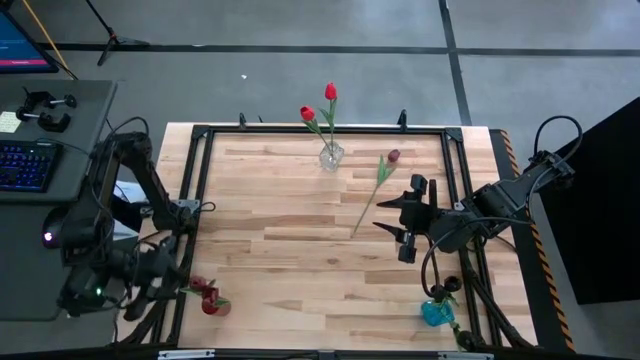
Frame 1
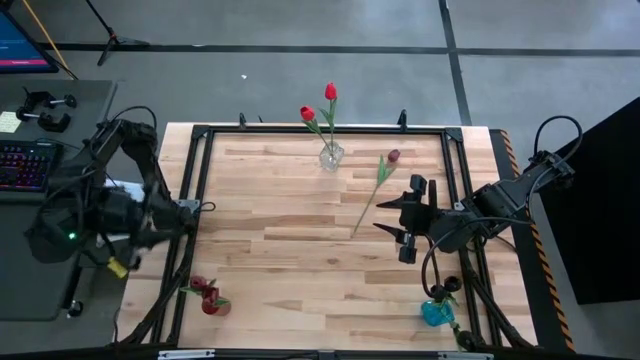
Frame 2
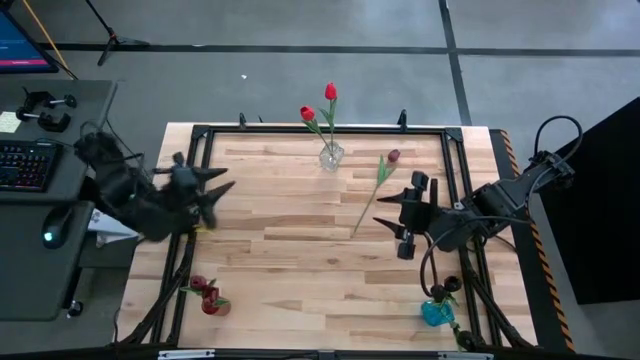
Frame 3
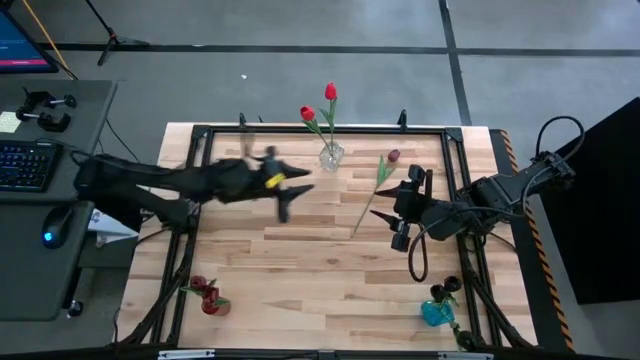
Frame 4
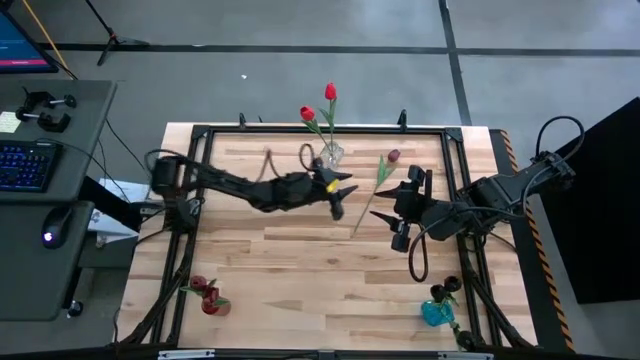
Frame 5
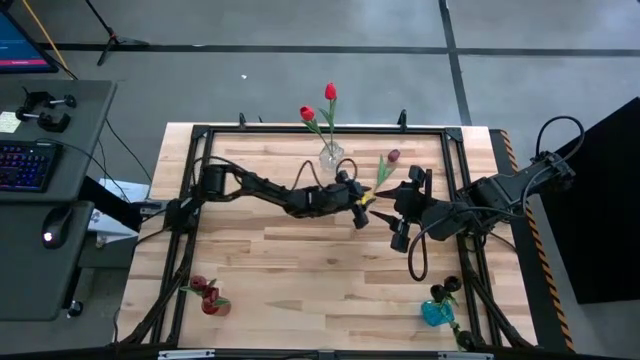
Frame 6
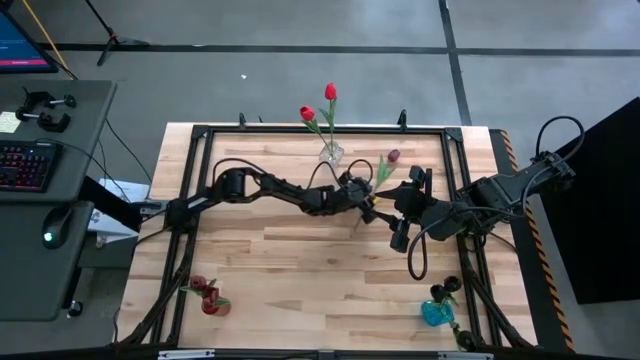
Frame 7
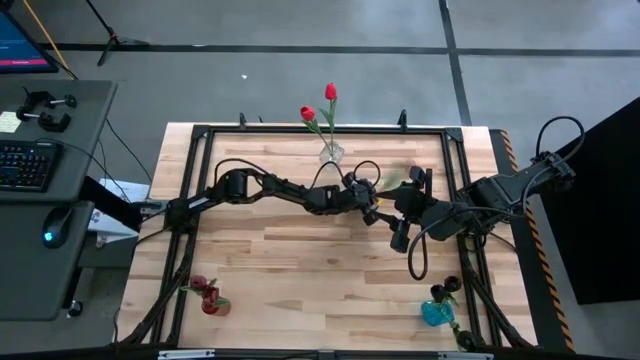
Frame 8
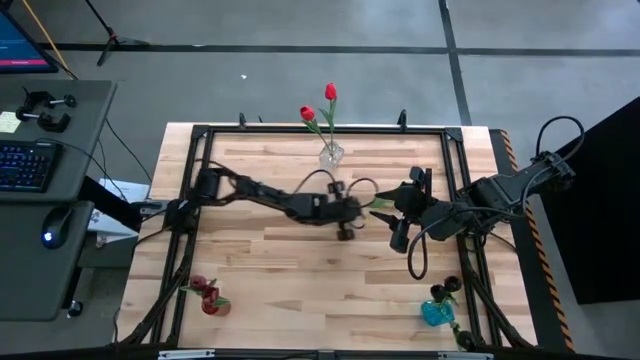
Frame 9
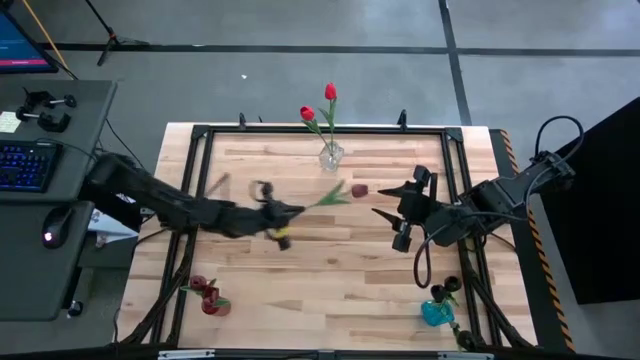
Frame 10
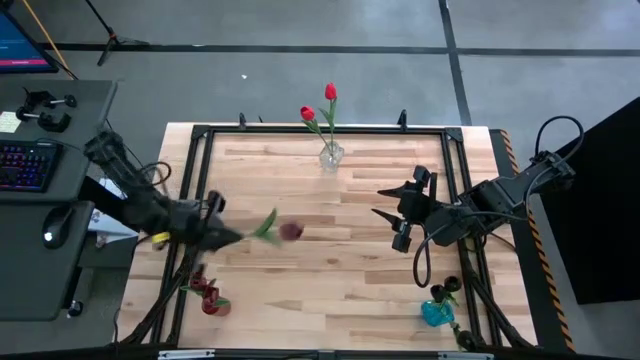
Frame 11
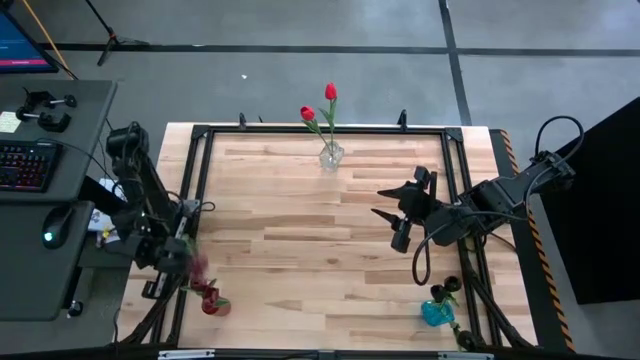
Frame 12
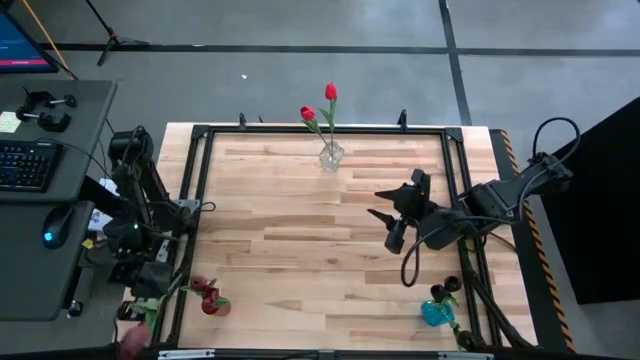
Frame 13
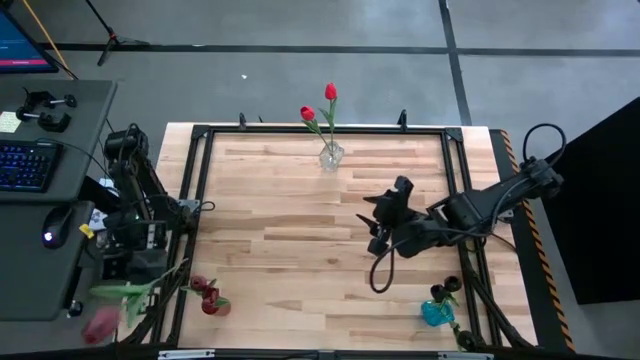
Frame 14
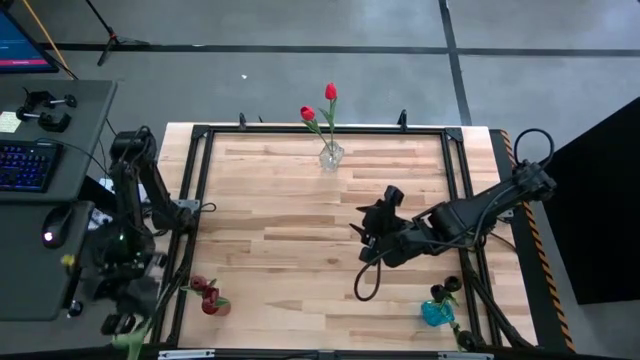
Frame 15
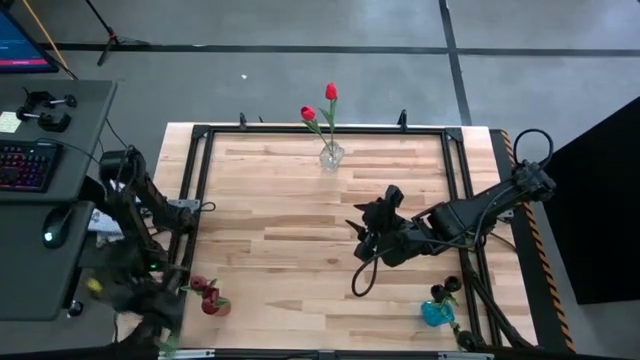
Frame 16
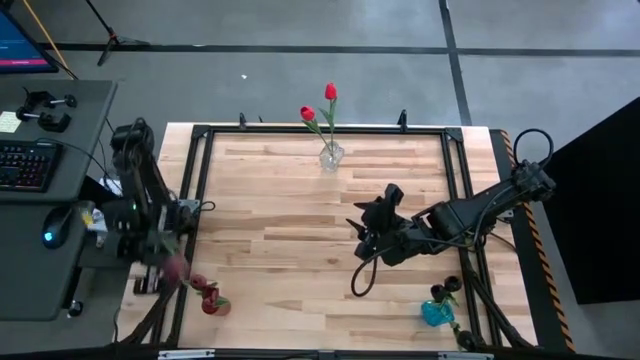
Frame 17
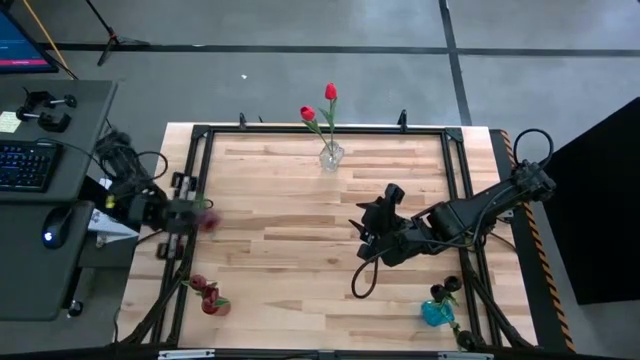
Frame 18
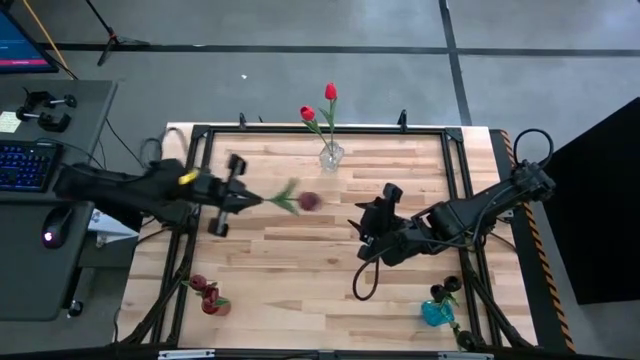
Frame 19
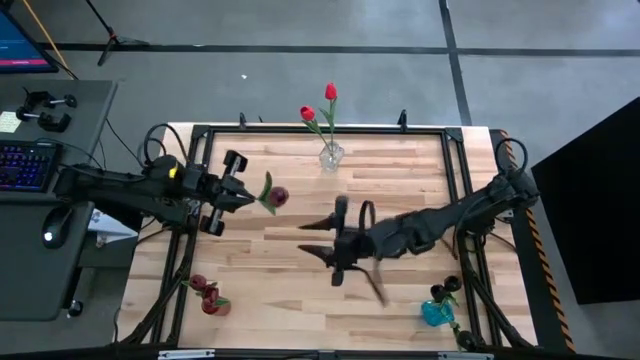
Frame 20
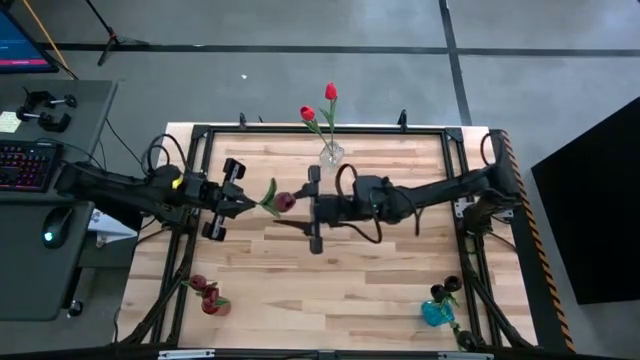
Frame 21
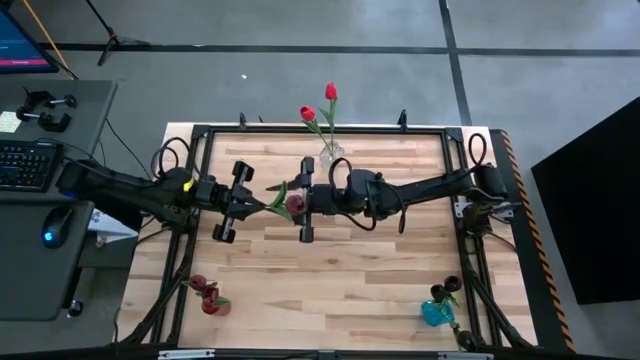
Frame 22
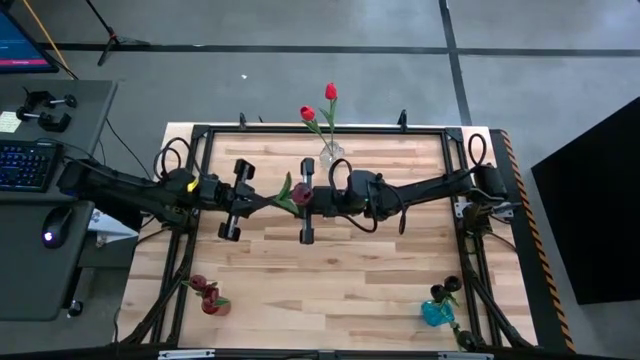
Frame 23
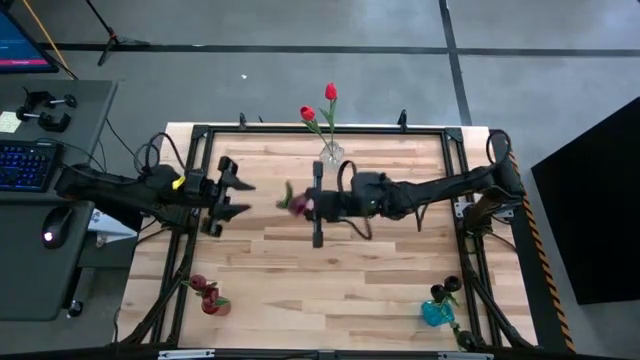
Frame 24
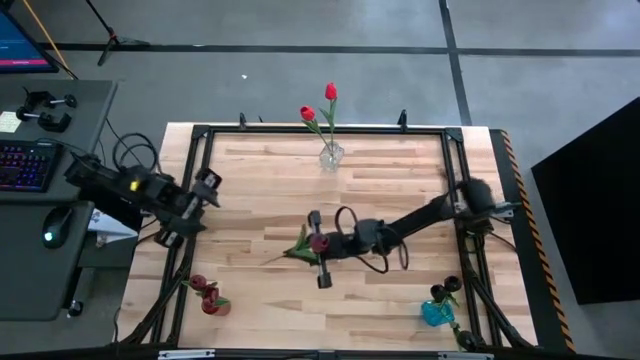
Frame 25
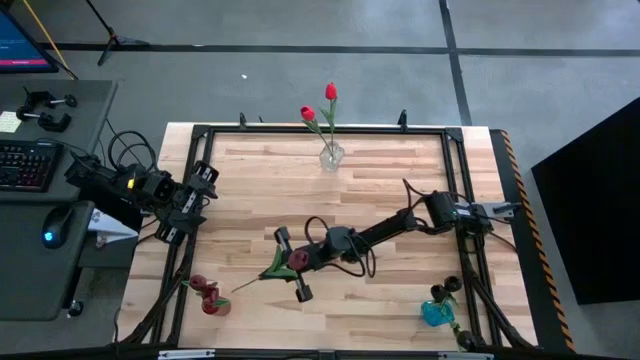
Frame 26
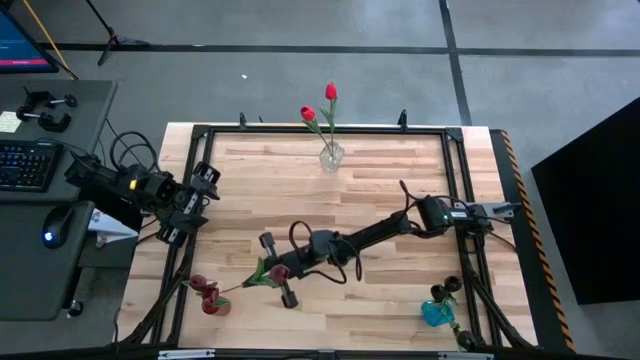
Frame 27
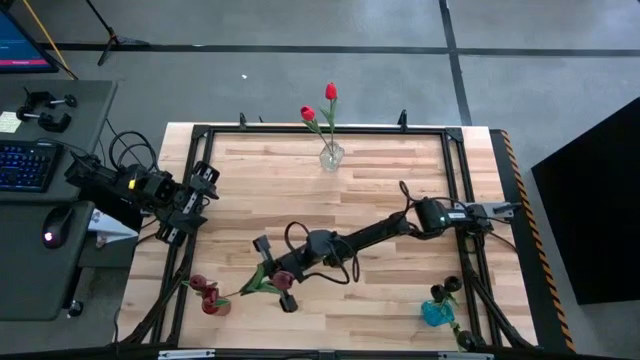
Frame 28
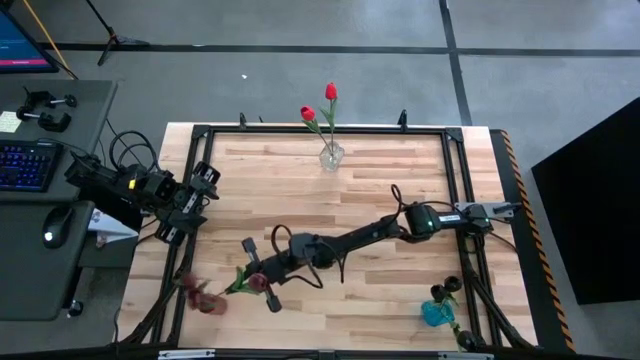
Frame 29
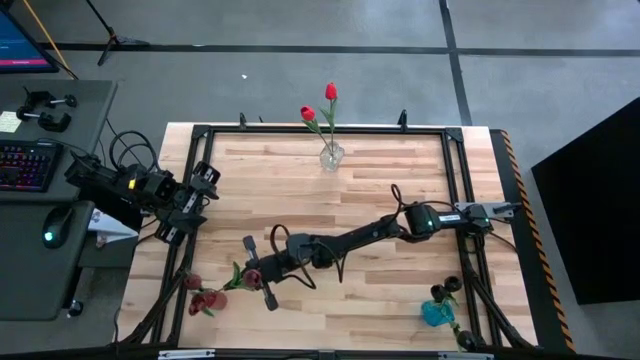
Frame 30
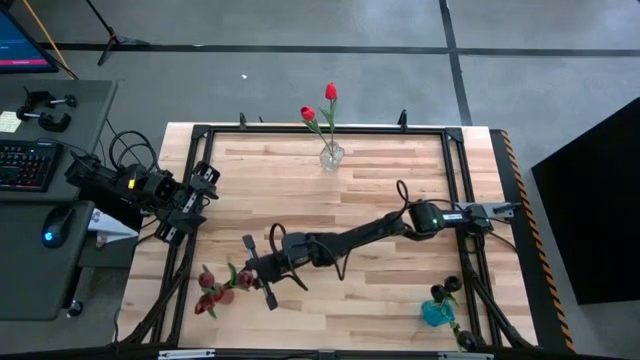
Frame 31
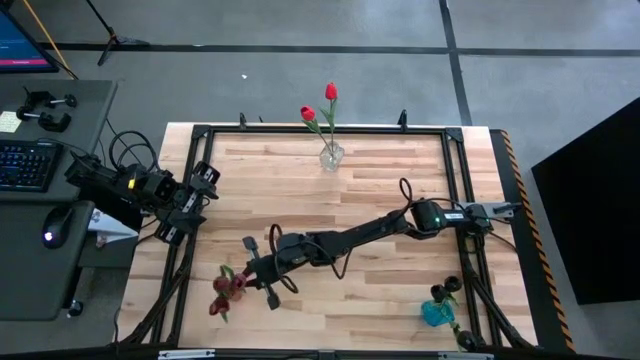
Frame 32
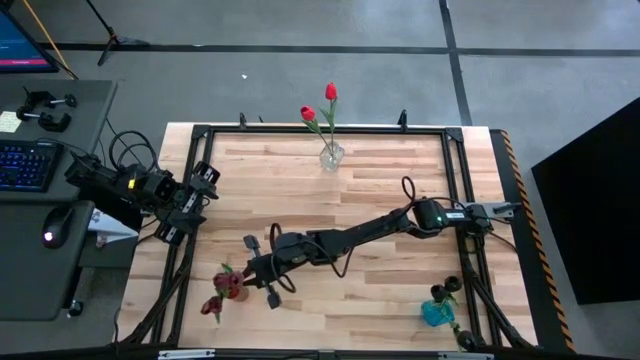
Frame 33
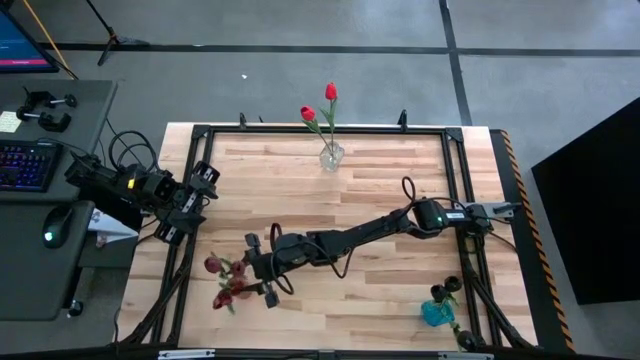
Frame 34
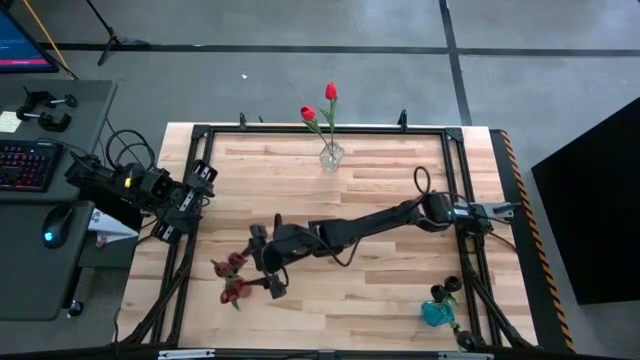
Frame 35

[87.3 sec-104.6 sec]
Task: Sort flowers into vase by color
Put the maroon flower into the red vase

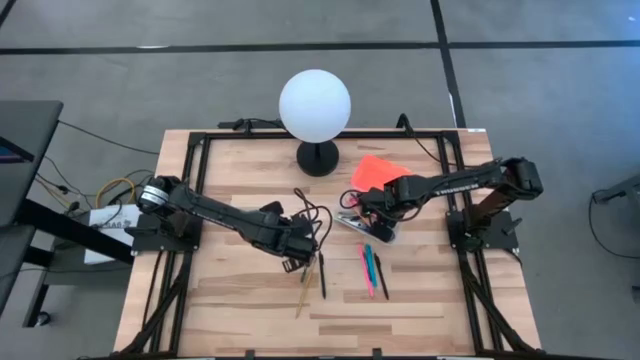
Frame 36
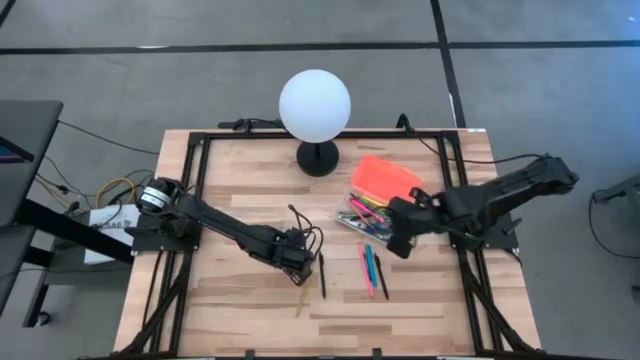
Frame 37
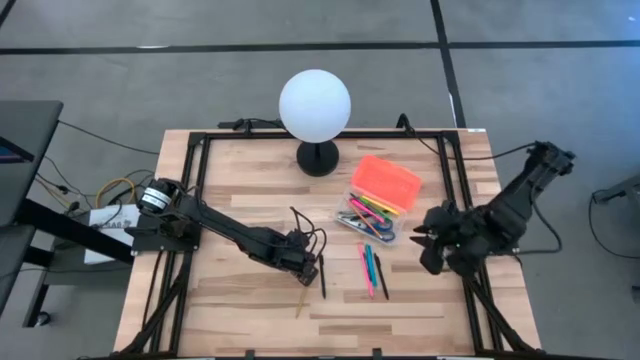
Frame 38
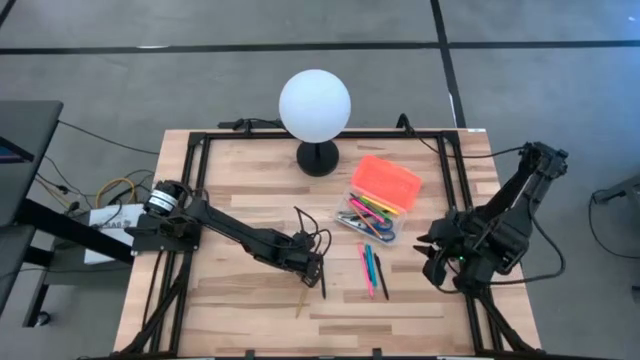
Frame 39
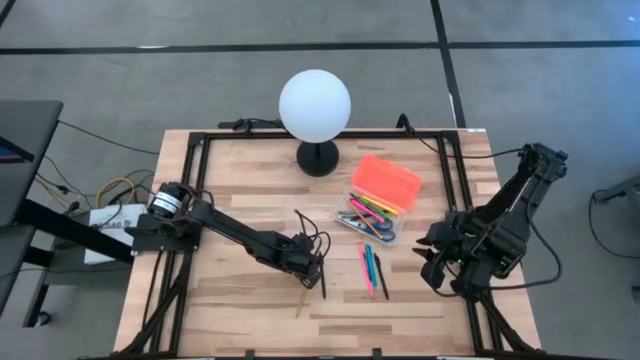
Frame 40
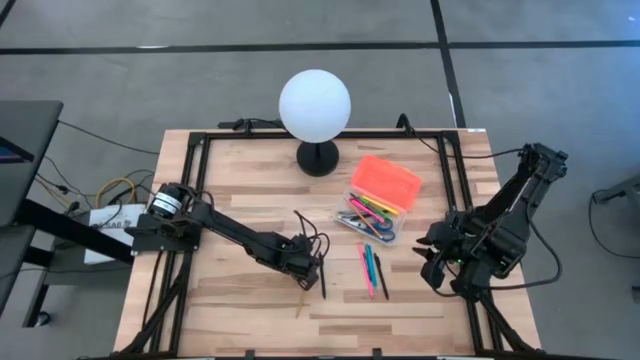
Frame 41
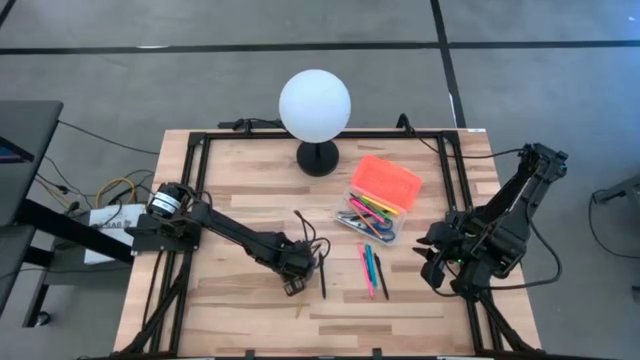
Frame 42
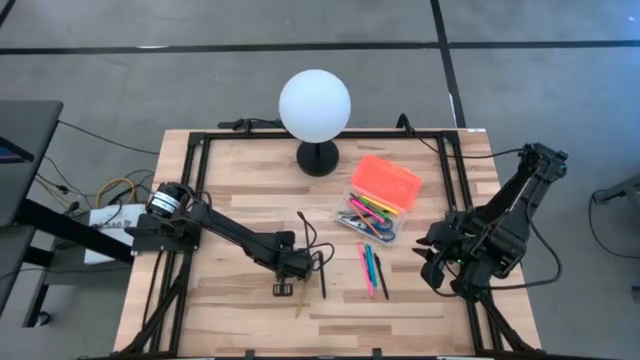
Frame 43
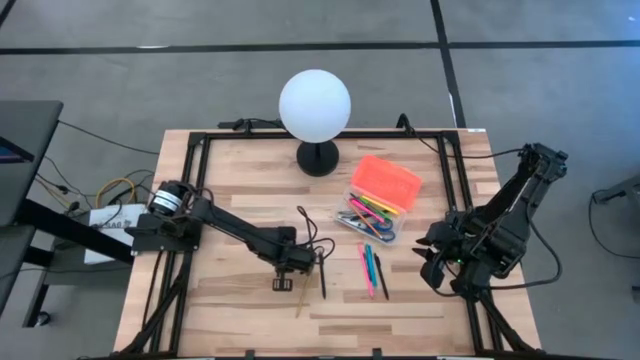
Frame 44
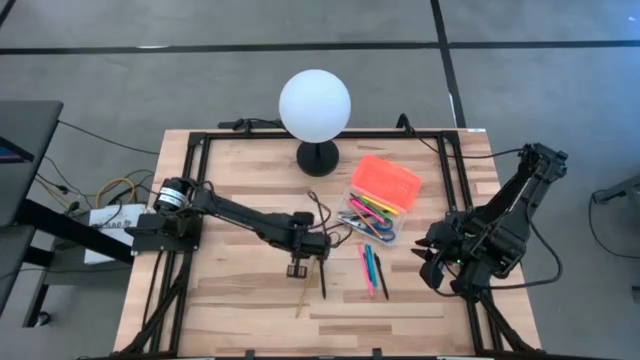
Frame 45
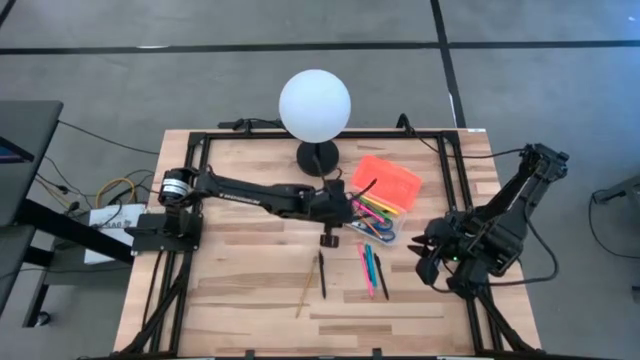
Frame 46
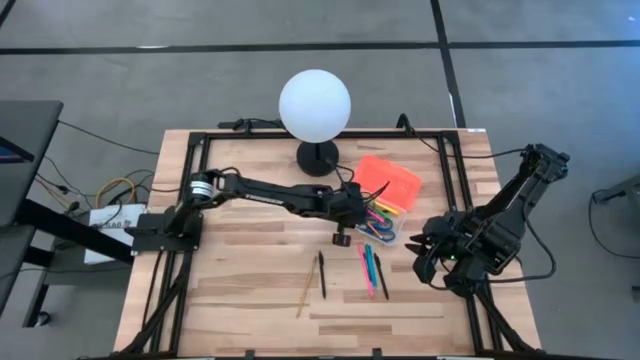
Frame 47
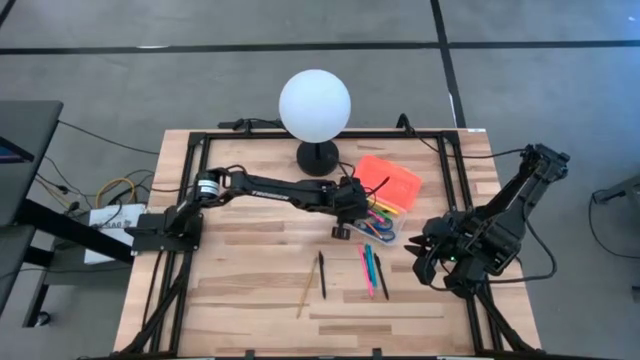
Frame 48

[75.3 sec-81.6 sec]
Task: Pick & place school supplies into a supply box
Put the green crayon into the orange supply box
